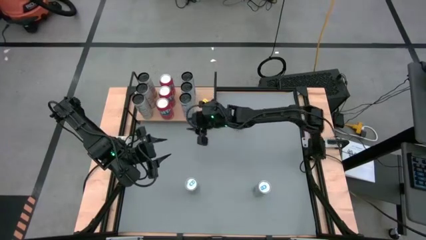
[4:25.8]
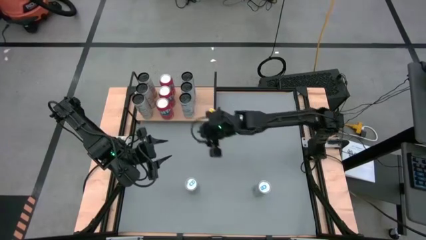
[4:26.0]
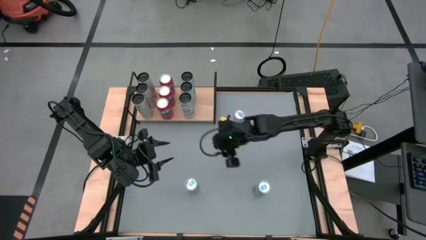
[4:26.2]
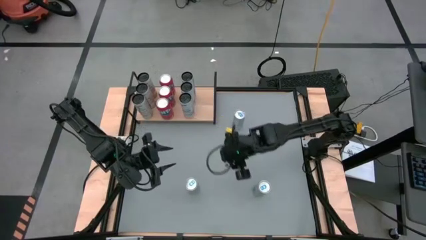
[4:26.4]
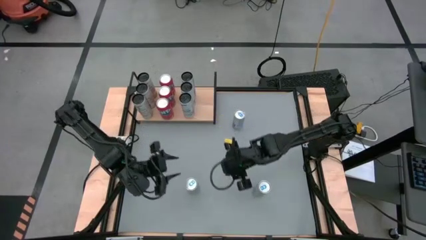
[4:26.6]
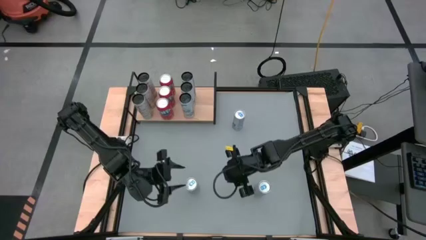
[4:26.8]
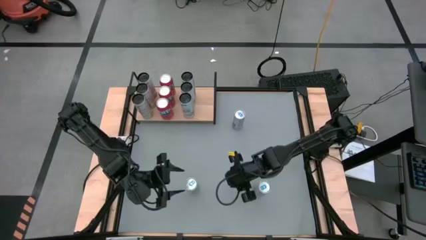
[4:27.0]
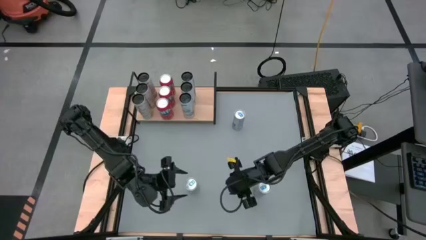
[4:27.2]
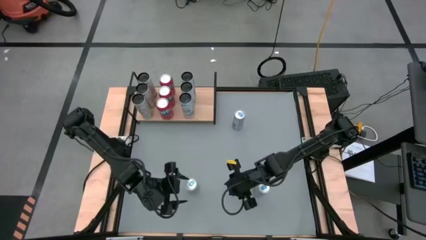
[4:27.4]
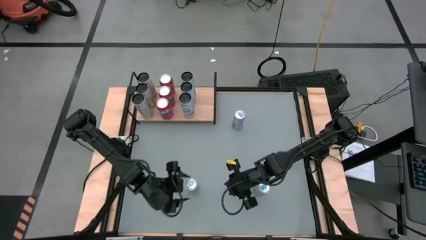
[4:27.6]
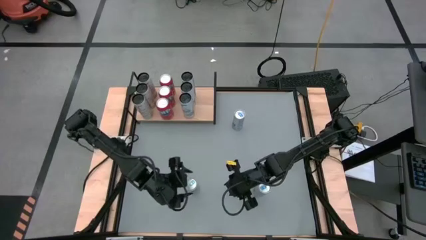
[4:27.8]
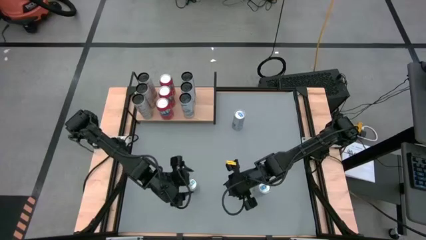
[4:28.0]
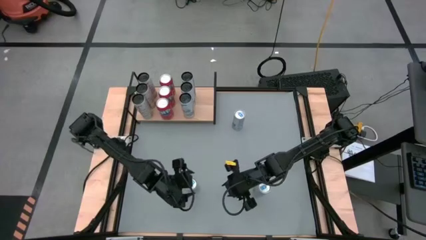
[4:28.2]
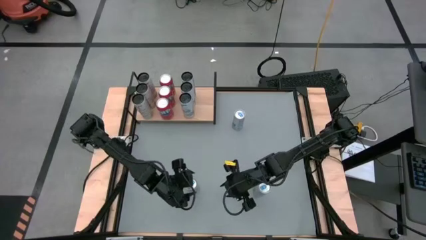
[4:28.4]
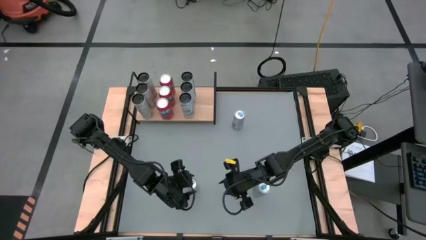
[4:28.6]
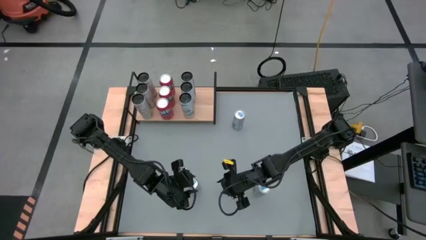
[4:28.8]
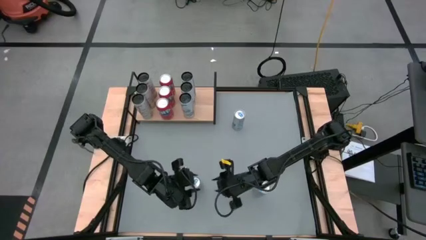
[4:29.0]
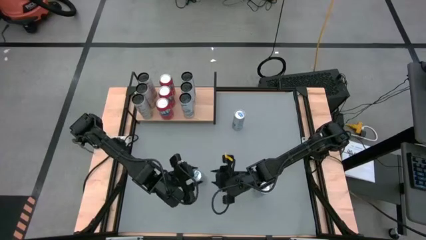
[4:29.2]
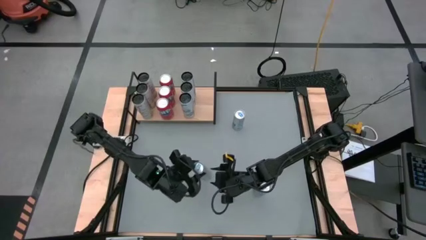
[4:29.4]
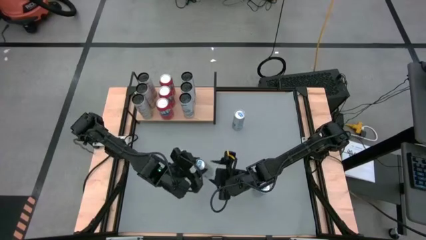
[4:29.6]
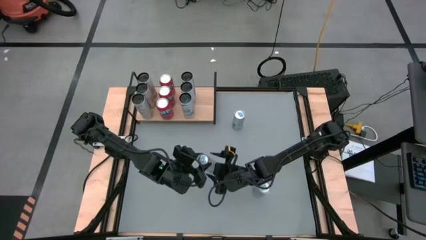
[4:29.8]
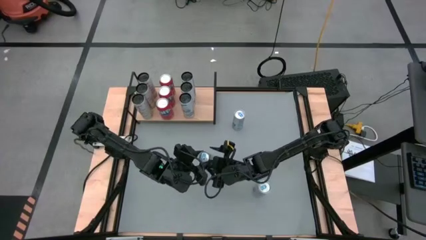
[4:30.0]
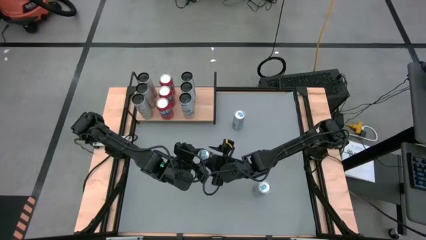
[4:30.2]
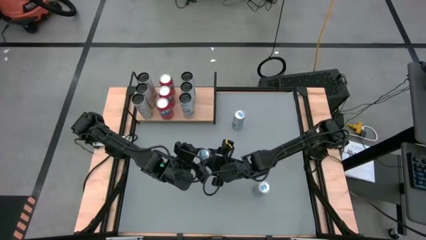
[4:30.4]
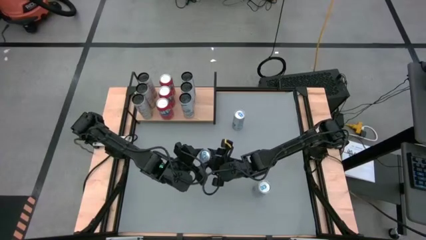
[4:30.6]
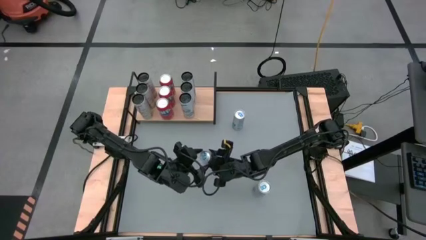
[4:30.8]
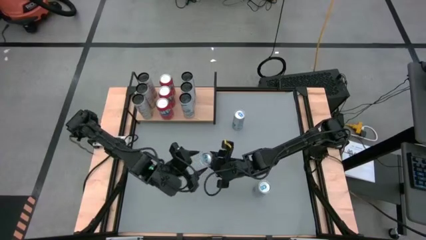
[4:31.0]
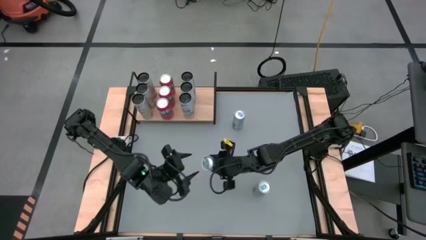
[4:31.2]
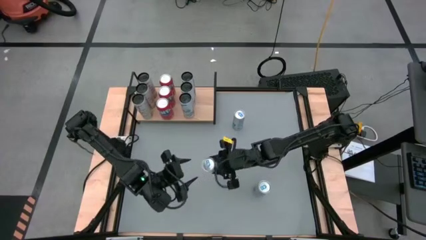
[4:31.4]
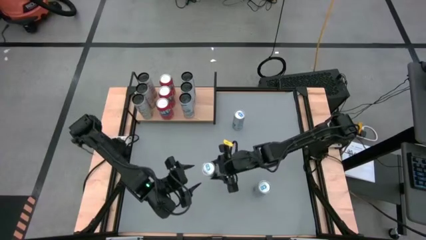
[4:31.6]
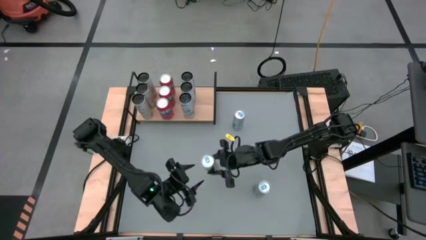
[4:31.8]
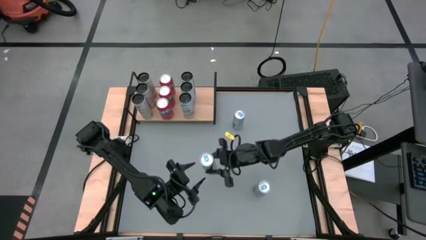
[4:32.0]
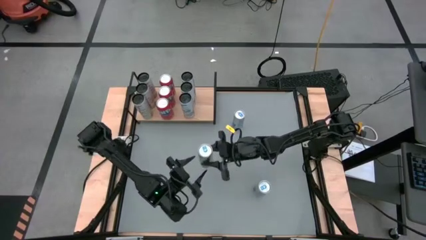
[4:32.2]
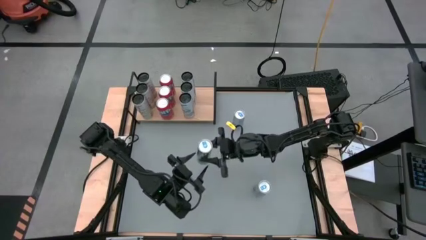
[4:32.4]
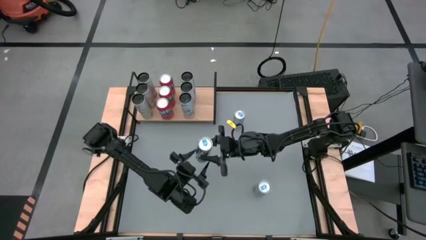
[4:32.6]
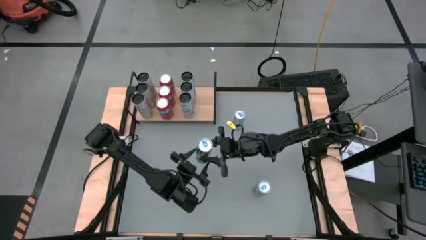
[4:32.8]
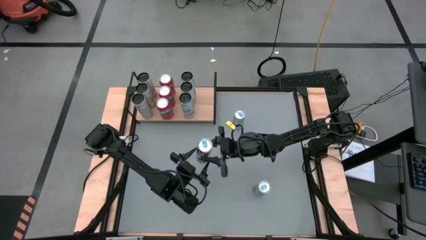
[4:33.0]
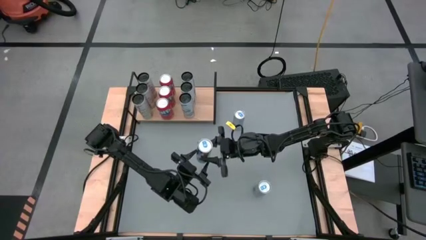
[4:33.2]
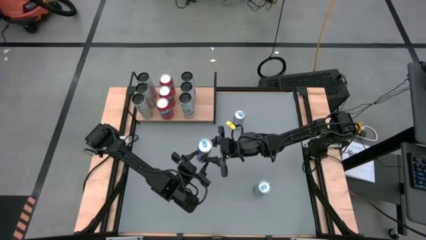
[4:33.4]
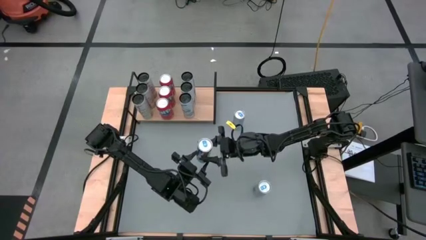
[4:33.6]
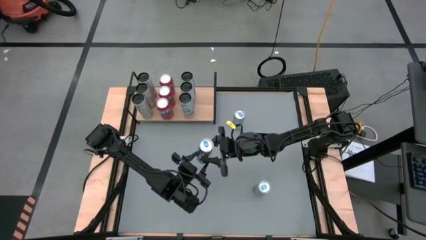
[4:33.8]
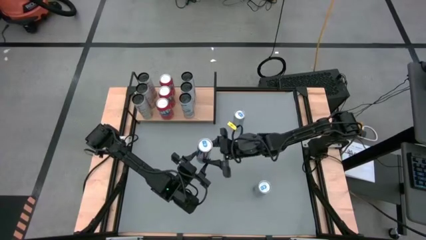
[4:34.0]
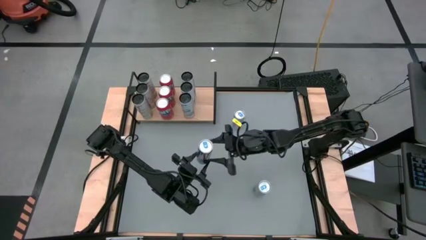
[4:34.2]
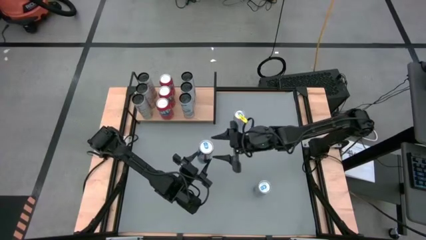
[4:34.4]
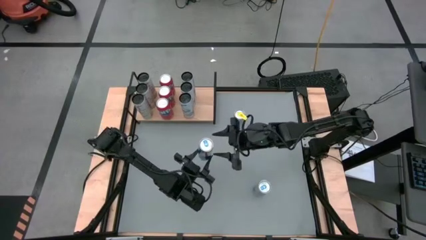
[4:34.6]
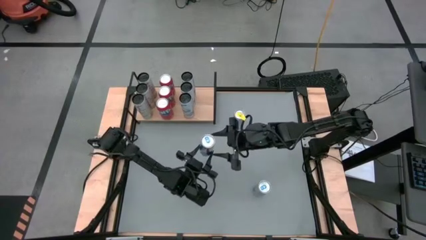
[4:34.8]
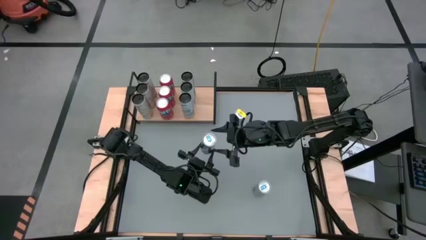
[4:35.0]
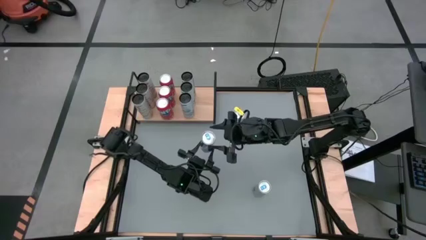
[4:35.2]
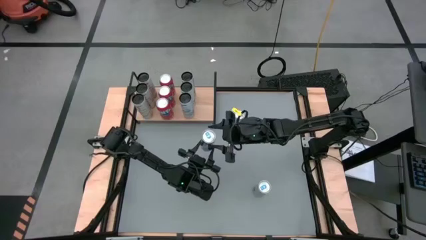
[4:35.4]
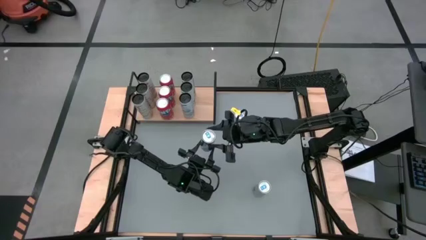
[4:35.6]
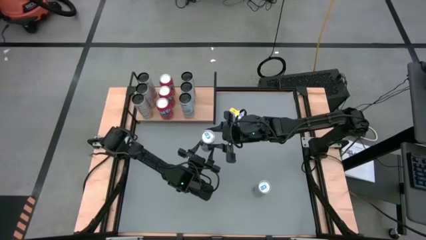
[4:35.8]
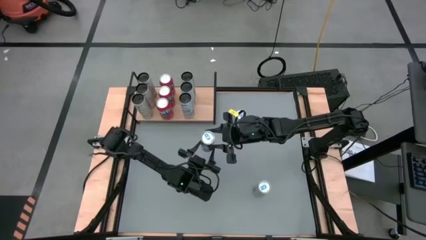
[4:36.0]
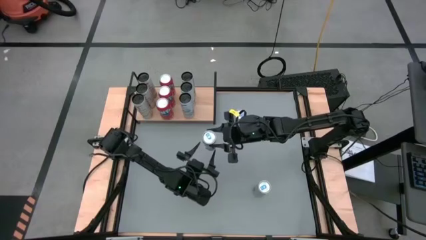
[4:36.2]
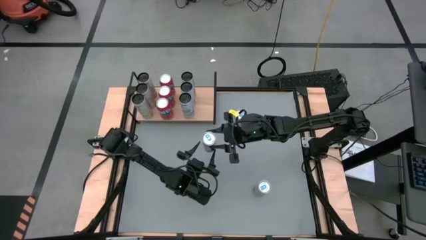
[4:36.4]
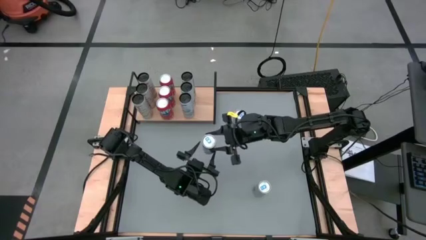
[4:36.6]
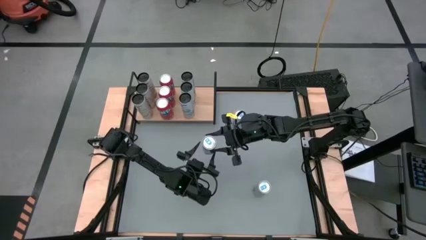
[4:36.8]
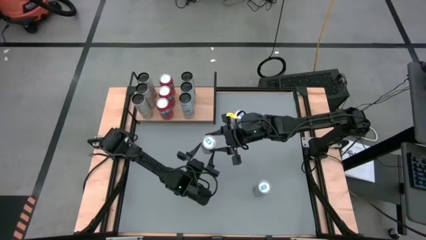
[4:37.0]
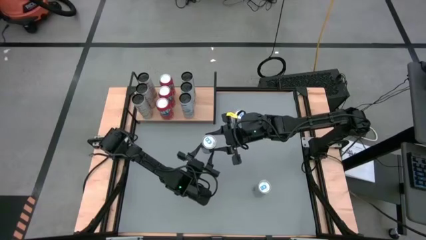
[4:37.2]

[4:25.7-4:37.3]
Task: Place canned beverage on shelf
Put the bottom left blue soda can on the shelf
